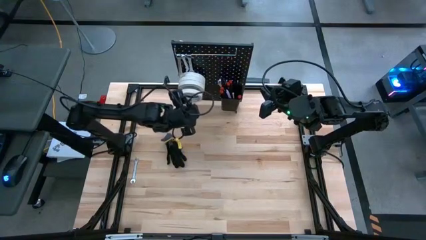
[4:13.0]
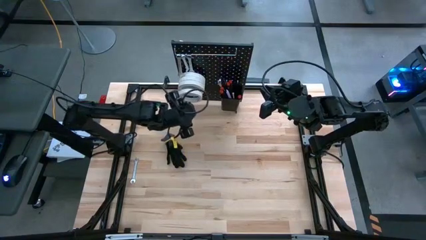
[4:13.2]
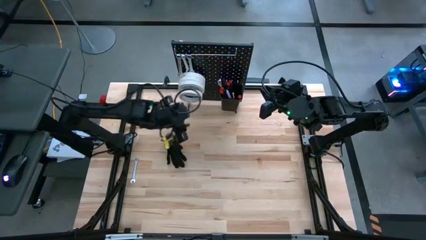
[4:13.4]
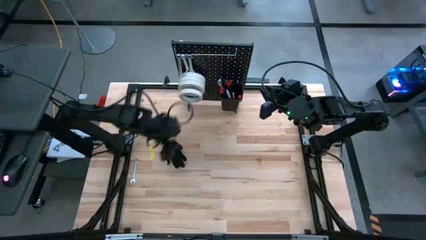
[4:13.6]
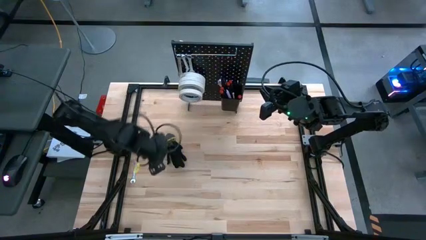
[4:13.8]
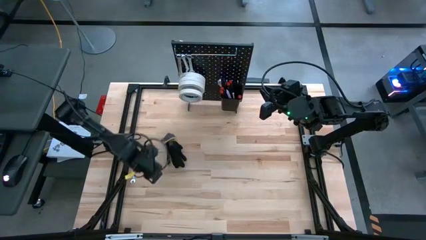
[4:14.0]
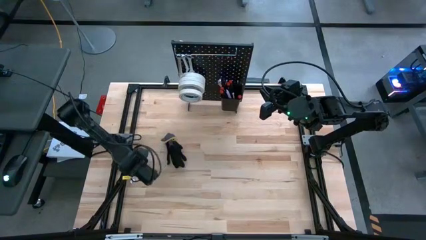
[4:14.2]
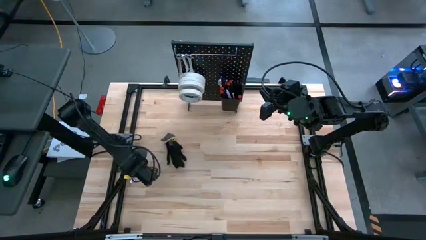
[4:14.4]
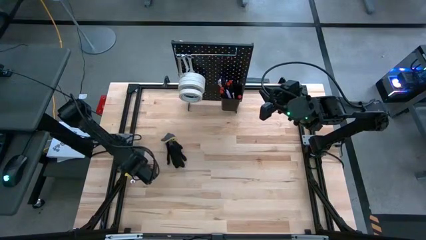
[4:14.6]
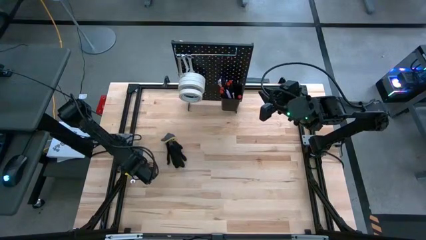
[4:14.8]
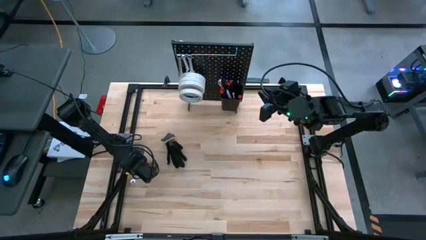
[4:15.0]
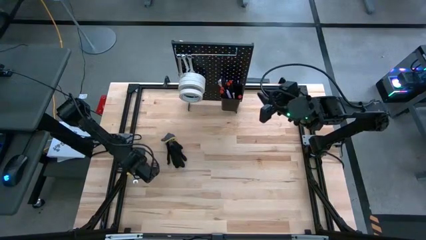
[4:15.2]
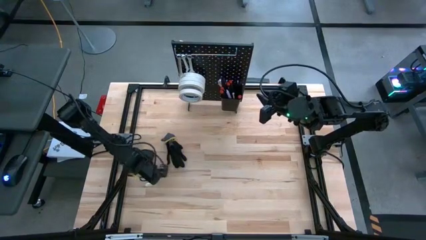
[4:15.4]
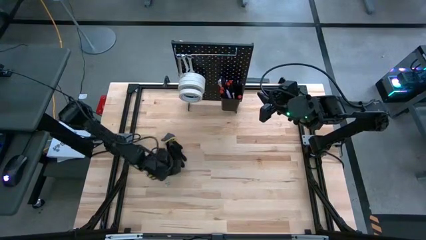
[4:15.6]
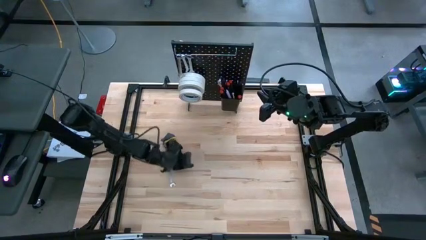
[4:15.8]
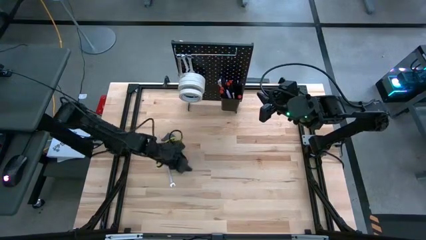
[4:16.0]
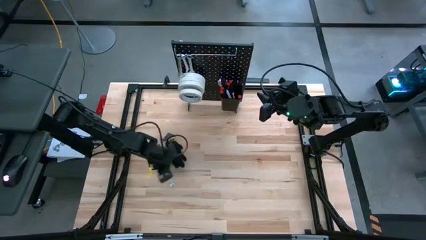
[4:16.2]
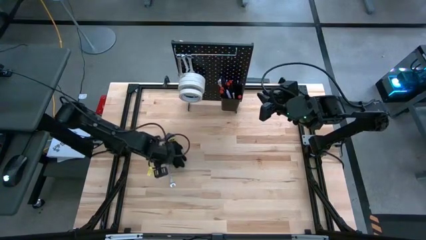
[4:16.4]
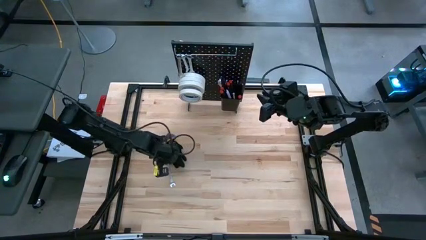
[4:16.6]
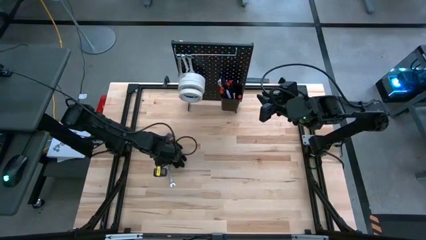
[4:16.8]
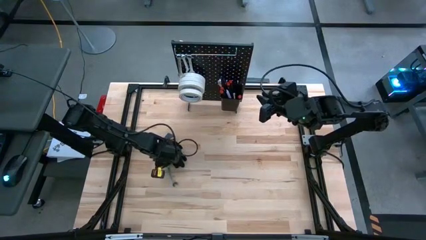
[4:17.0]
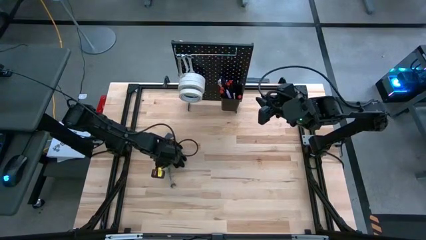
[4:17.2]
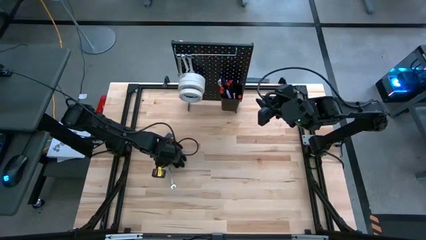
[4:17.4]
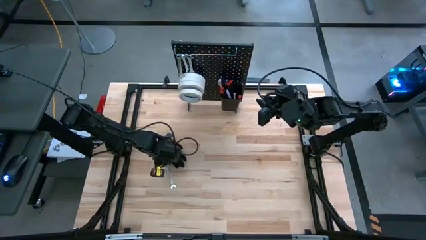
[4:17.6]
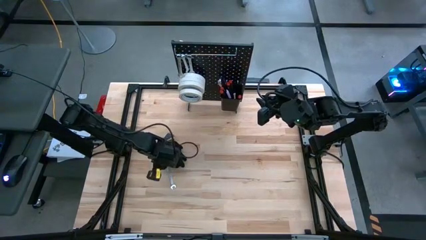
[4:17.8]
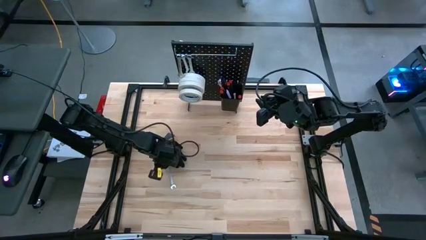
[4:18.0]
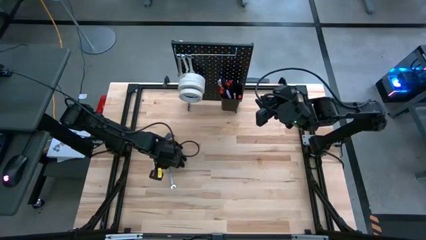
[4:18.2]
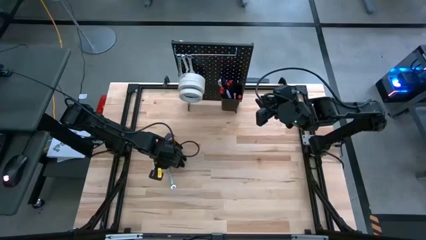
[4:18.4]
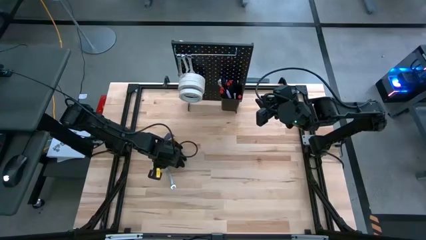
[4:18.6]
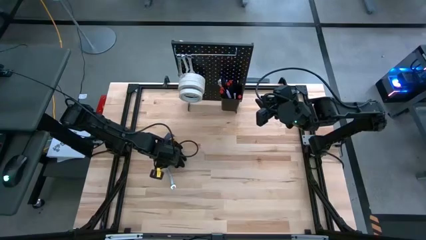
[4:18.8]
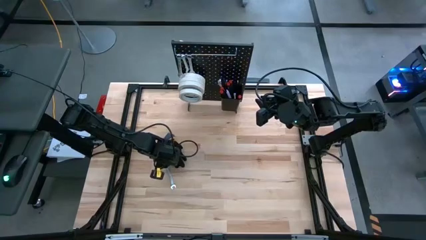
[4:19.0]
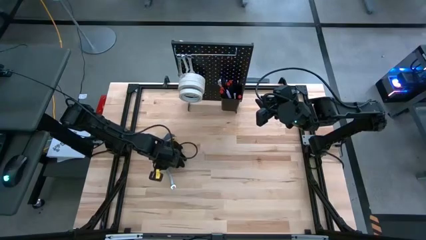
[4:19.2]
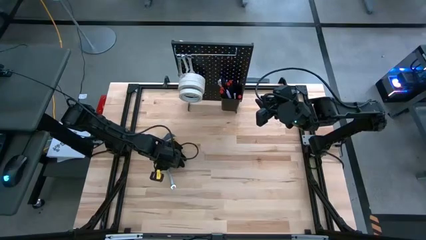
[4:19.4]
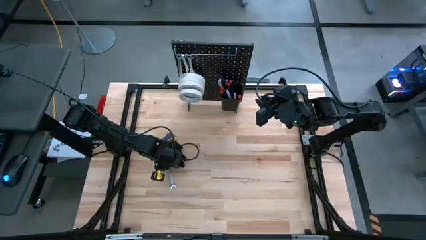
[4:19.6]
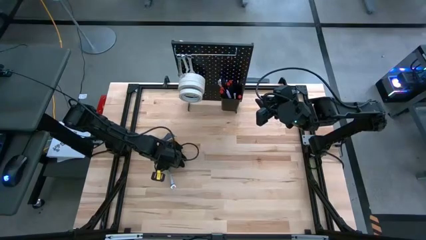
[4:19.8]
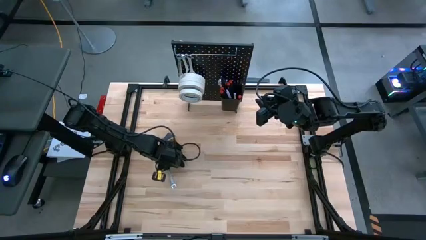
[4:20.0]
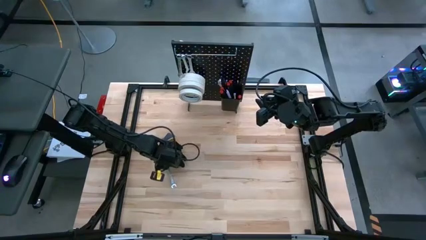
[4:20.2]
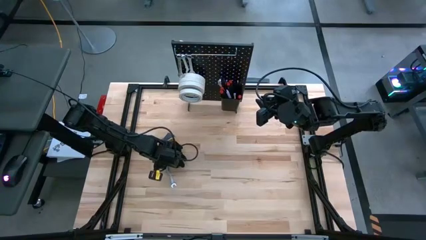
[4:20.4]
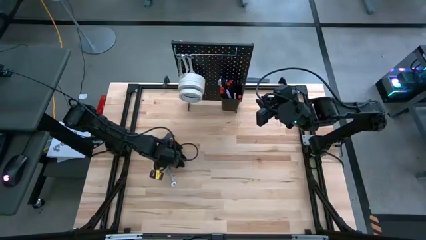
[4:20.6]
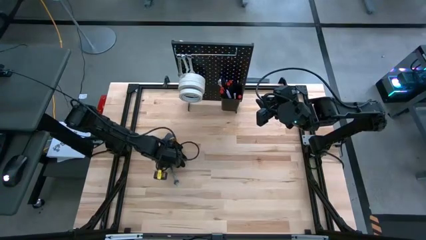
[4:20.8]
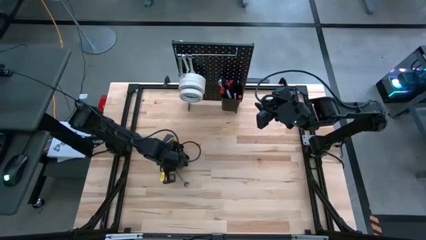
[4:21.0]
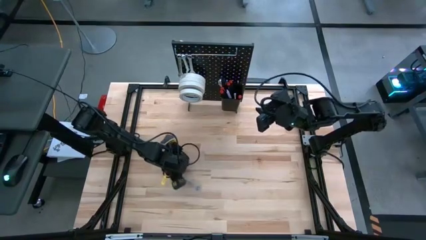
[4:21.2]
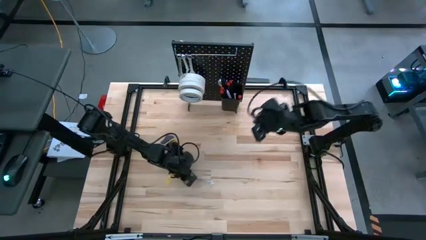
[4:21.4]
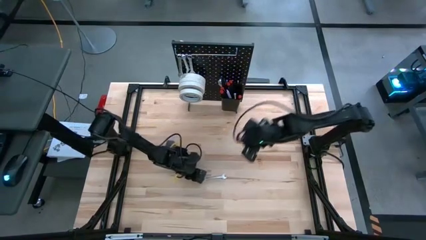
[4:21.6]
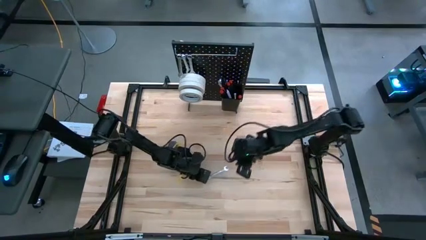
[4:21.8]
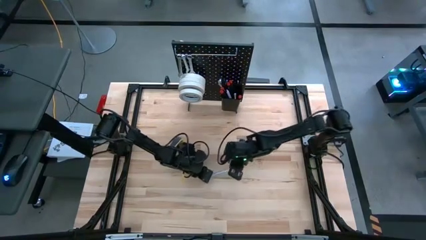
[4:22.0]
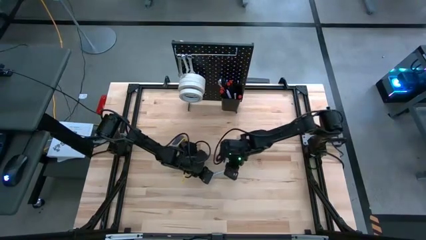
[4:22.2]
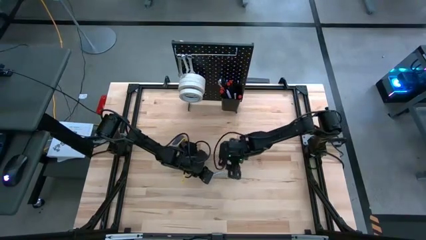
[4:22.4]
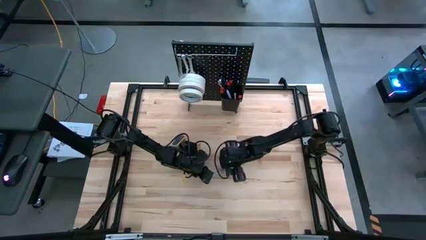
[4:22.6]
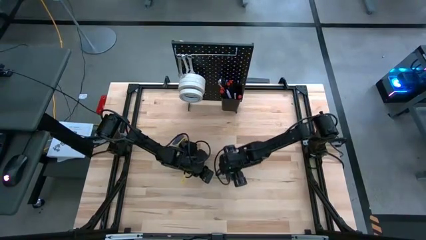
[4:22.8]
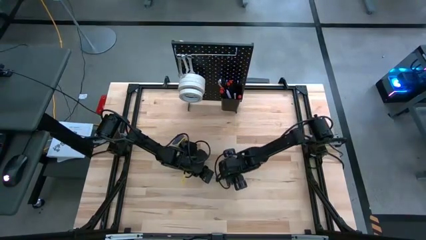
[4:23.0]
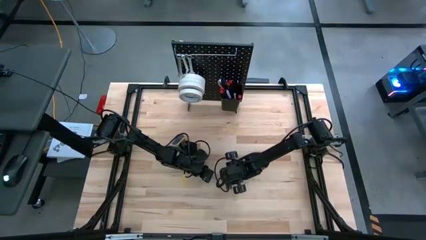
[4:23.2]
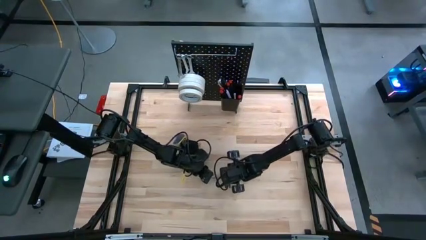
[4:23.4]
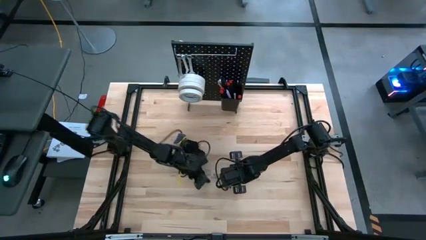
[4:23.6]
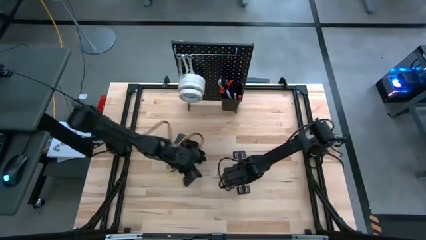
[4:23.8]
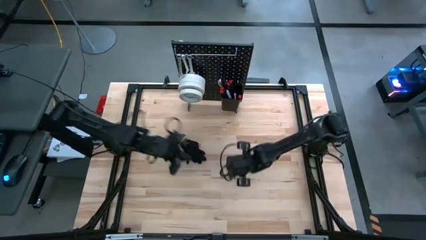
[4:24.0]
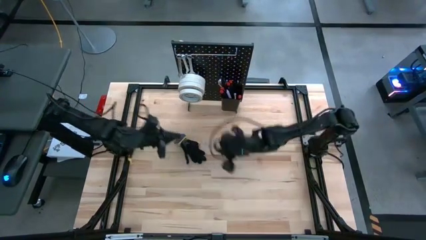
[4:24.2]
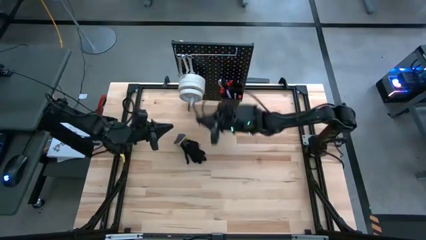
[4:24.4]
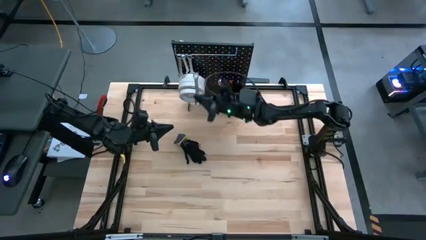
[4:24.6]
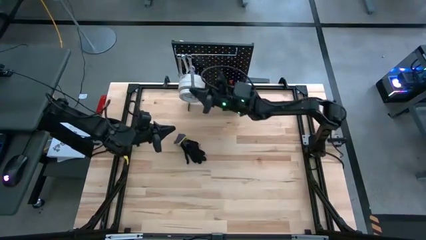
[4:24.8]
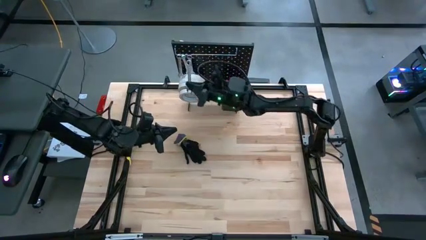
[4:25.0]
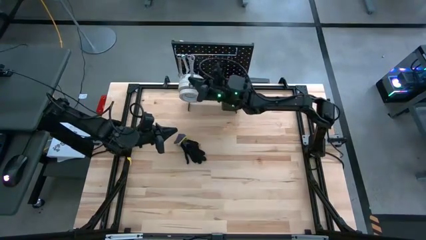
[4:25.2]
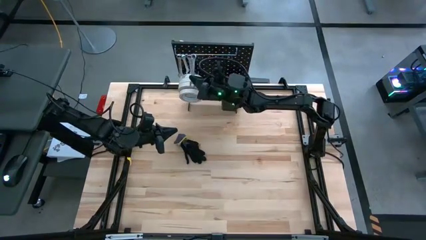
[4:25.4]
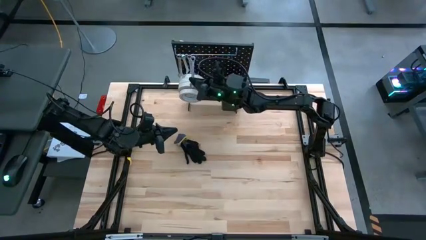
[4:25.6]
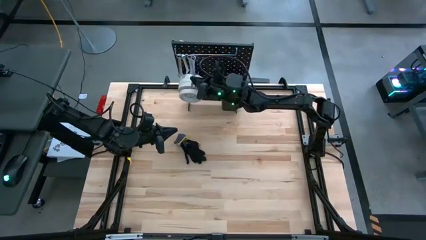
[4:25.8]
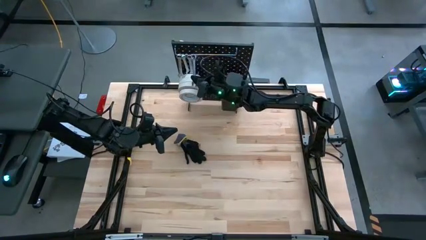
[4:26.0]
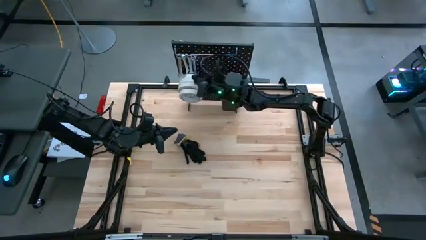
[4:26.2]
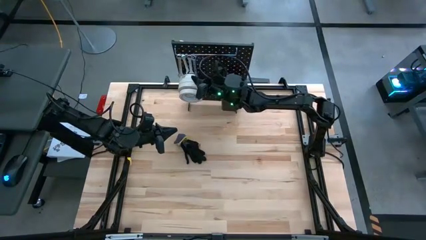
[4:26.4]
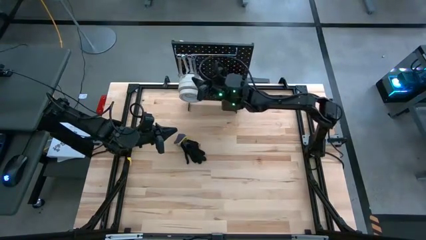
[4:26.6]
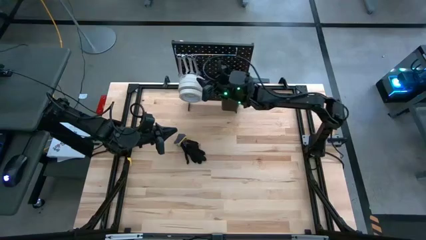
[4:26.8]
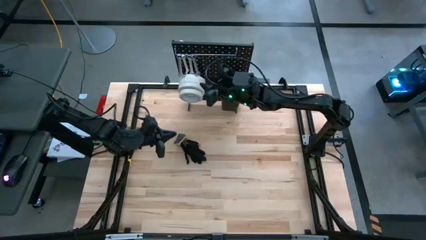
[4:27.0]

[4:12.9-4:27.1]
Task: Hang tools onto peg board
Hang the wrench onto the peg board

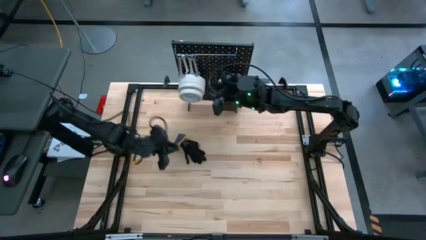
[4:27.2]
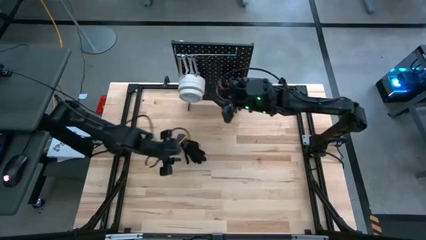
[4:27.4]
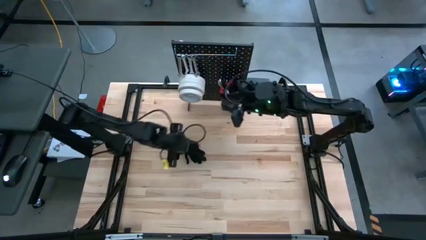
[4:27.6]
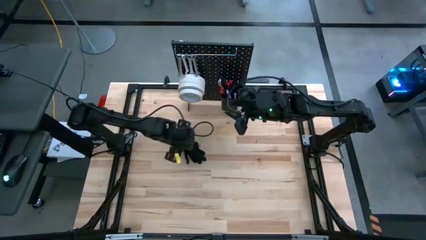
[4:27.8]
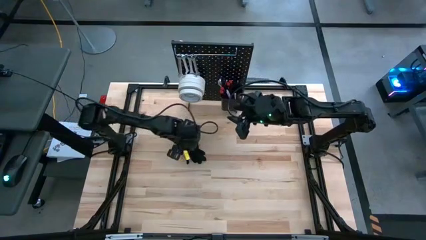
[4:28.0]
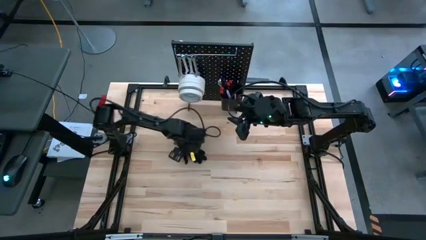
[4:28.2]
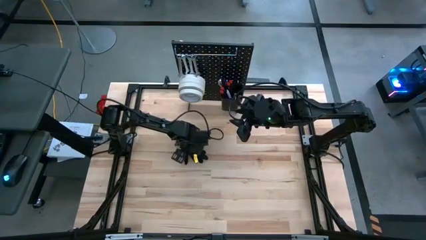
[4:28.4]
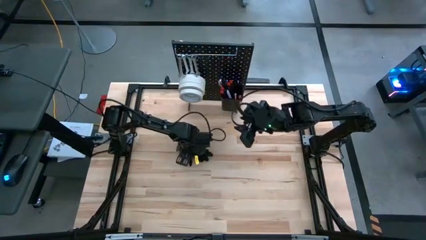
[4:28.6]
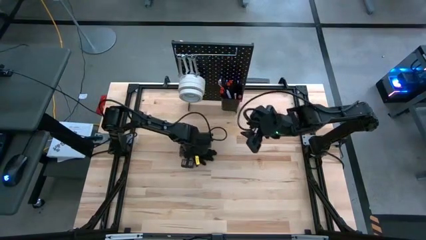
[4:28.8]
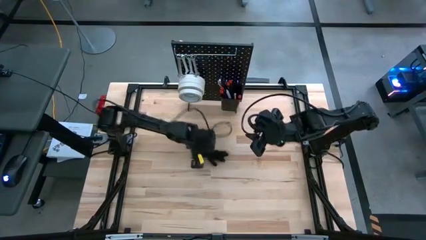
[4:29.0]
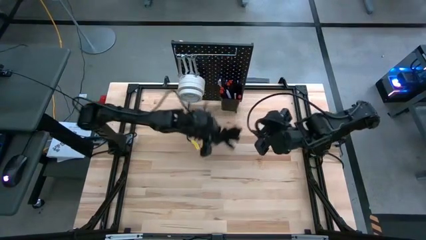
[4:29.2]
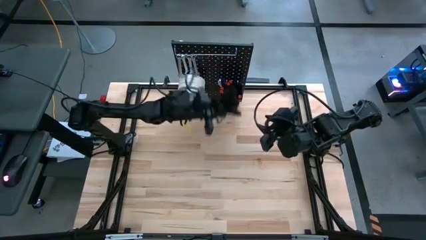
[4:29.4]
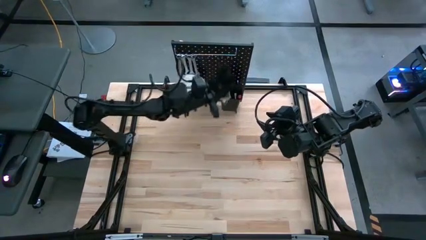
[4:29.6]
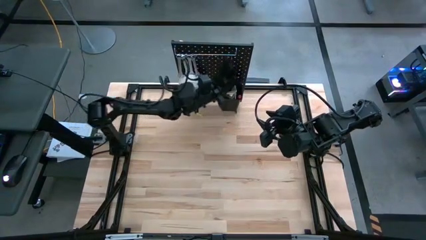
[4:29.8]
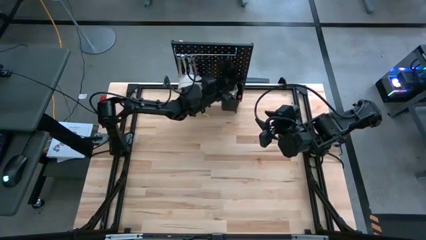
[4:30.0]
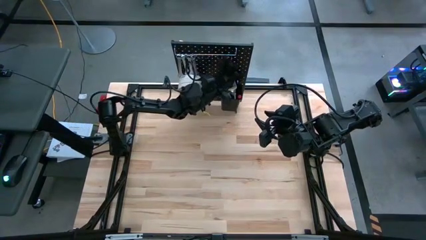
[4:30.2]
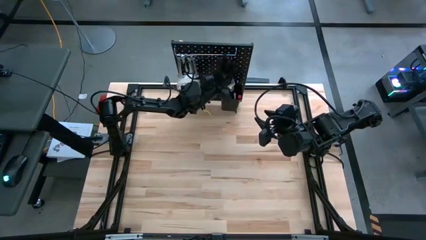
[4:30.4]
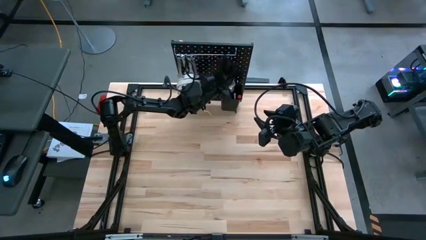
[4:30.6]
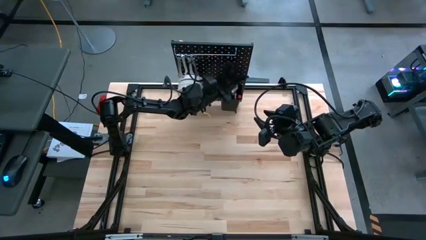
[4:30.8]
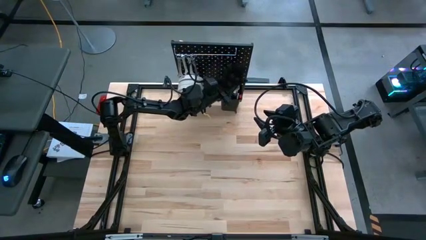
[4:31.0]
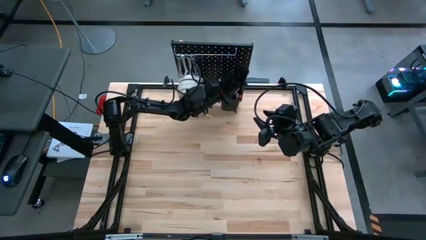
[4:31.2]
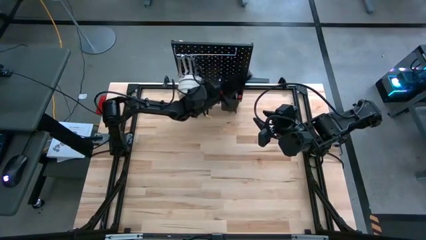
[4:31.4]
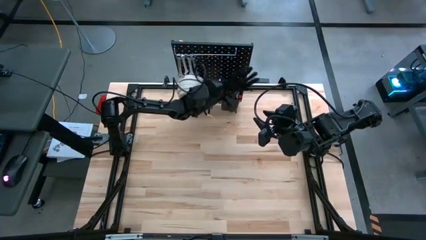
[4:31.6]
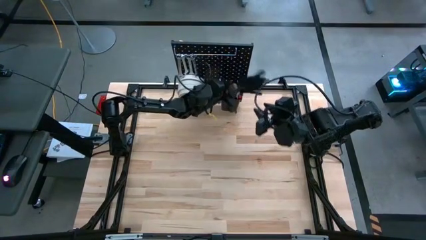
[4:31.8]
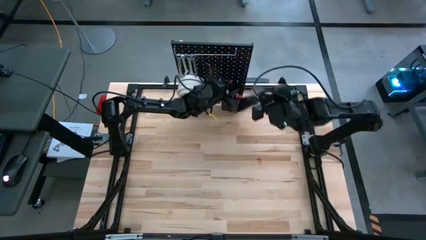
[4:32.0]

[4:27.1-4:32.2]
Put the gloves into the black bin on the peg board
